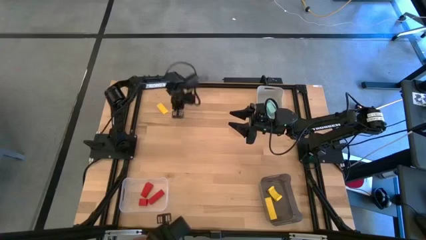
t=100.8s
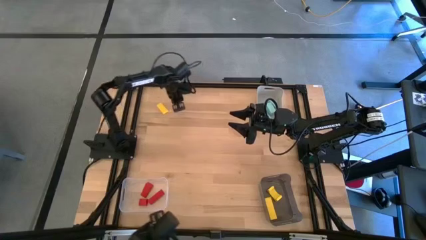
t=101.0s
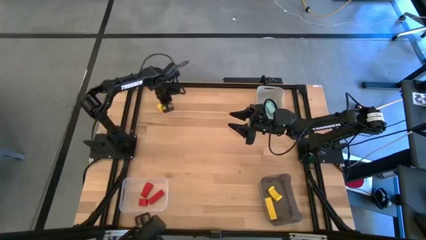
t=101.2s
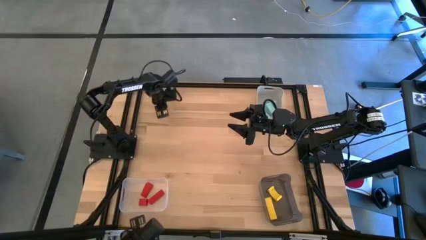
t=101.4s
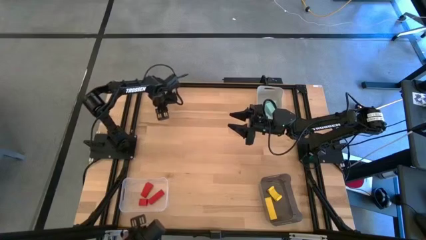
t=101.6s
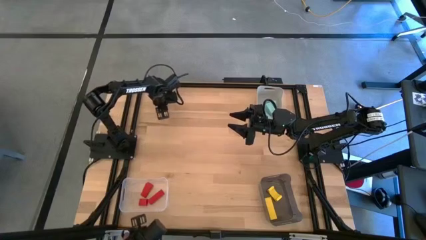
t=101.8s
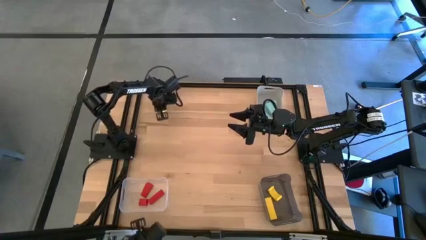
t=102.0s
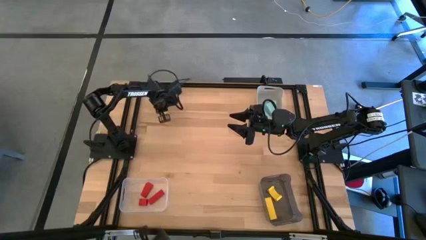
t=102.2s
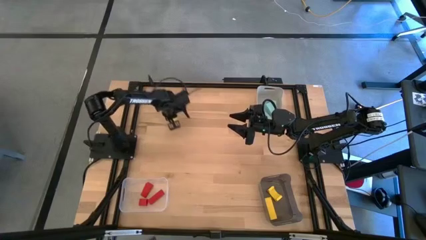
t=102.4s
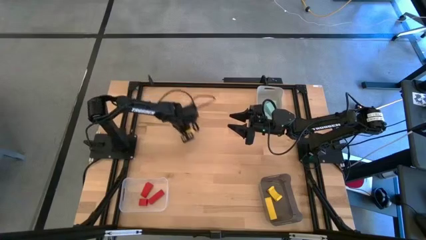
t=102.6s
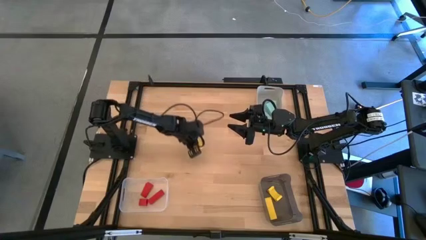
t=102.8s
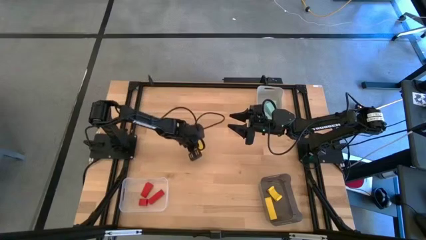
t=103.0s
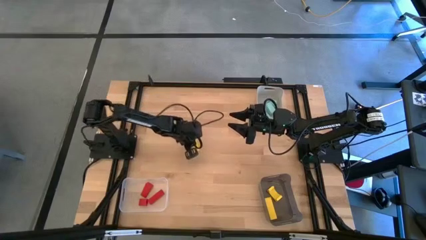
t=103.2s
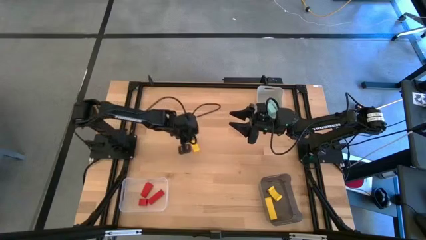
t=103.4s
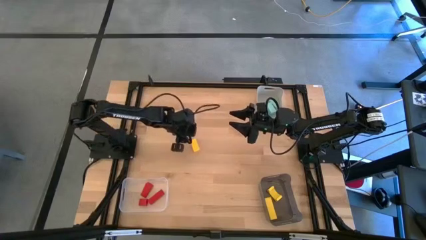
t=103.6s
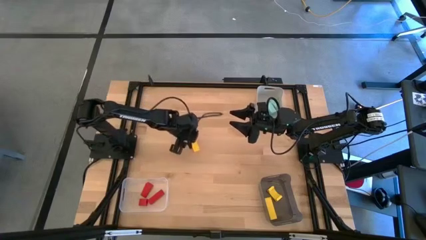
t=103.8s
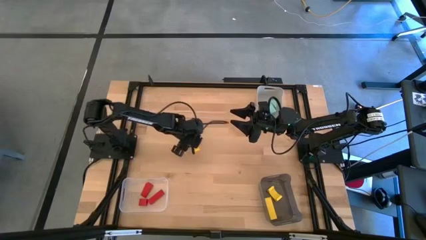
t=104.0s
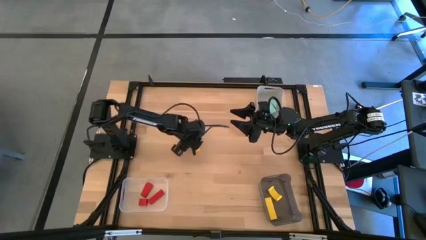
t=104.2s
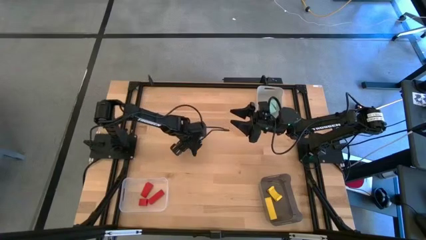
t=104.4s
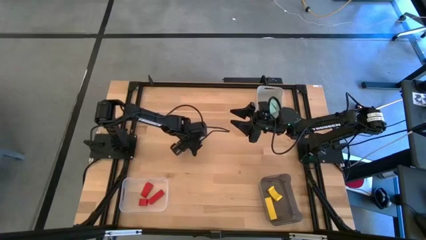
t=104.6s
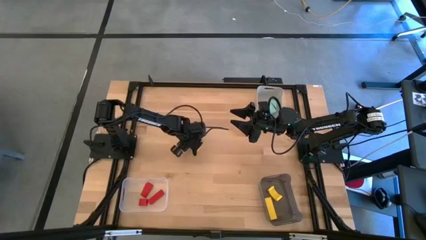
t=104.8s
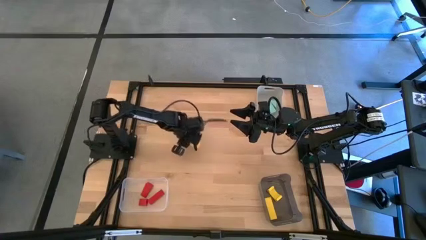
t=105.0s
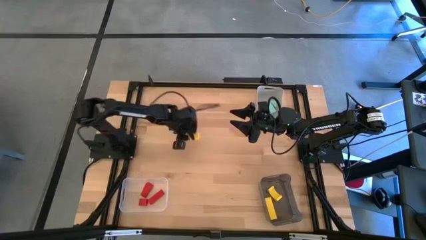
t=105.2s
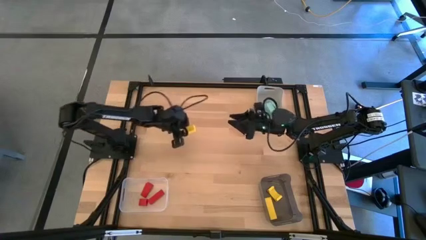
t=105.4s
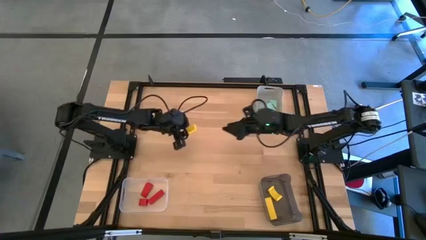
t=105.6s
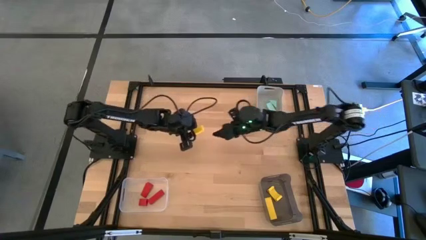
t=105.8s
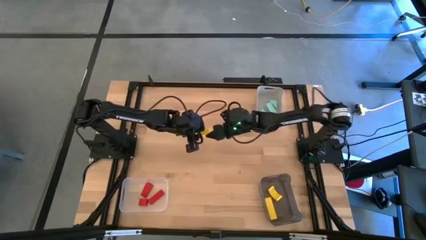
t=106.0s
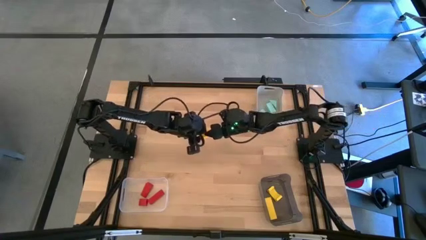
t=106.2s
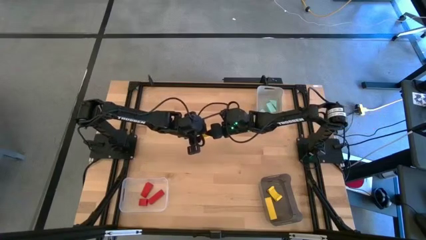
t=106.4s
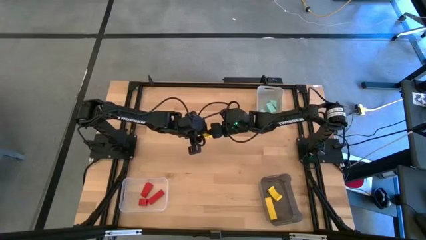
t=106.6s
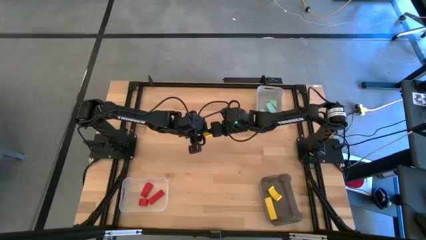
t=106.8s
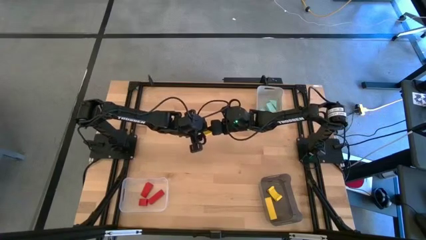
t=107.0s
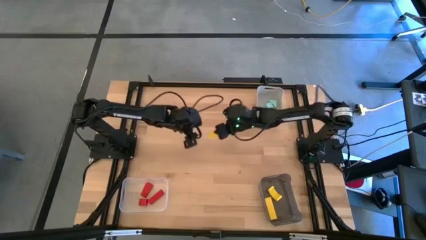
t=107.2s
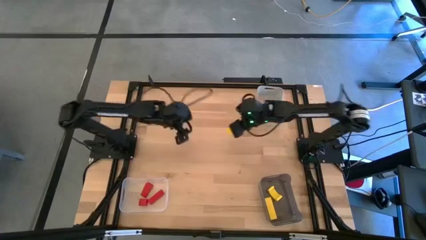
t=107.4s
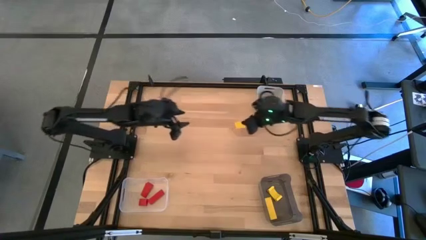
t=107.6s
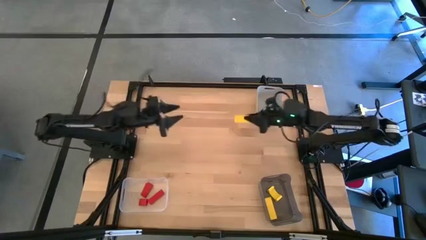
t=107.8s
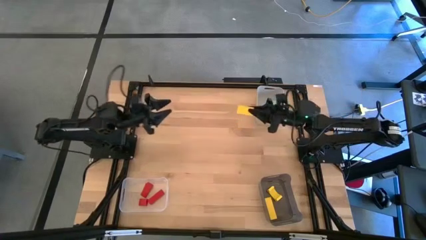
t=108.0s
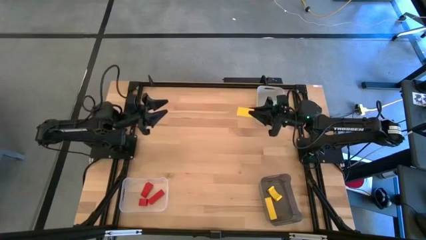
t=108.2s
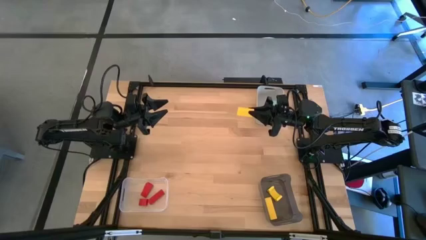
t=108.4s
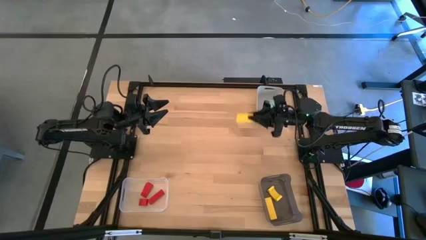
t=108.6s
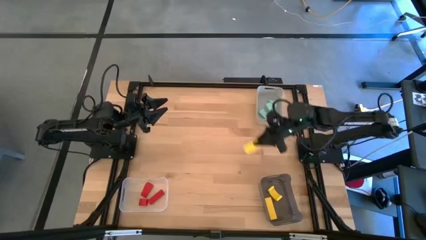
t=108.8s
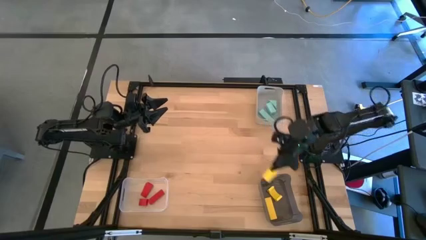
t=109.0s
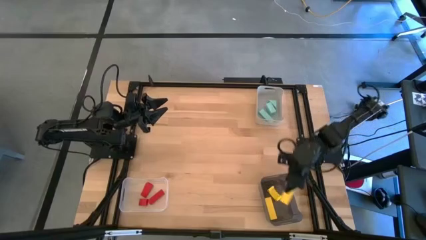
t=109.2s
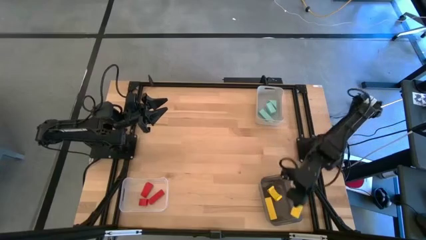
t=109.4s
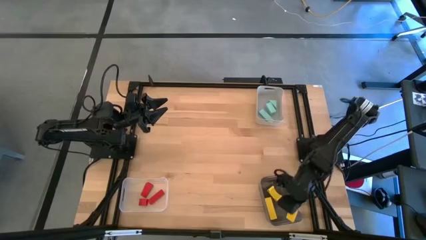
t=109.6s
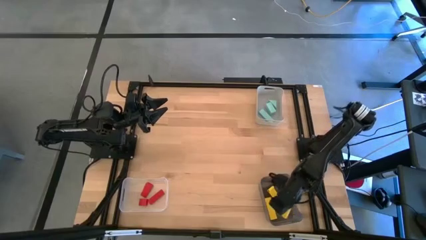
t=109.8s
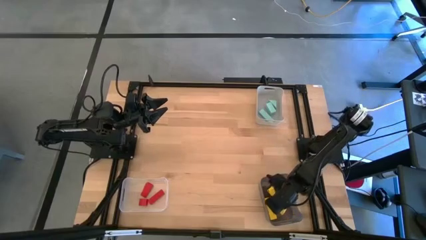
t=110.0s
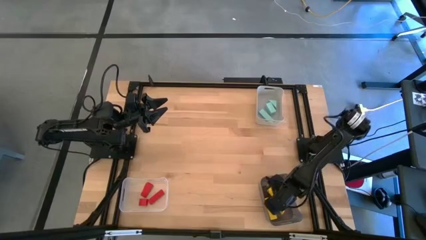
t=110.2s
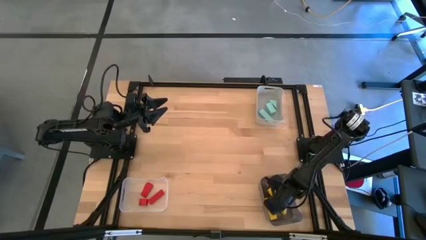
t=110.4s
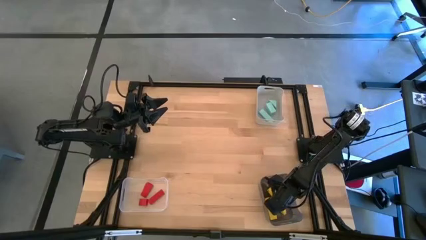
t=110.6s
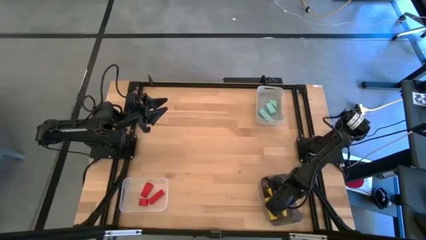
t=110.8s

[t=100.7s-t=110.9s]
Task: Sort & place blocks by color
Put the yellow block into the black bin

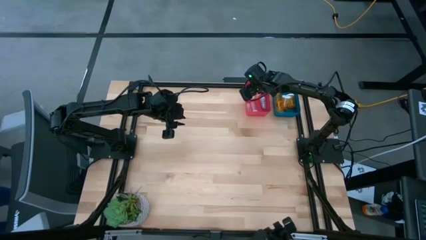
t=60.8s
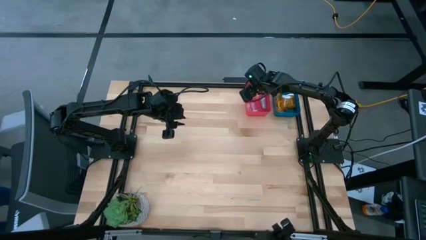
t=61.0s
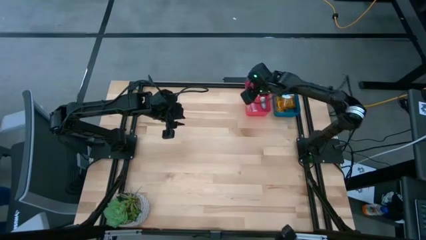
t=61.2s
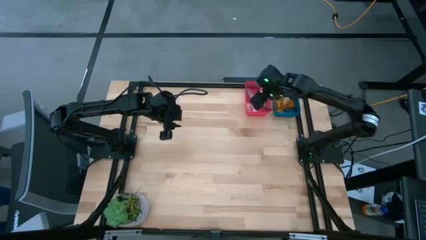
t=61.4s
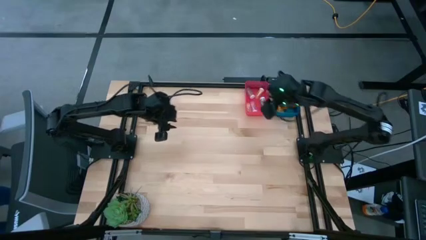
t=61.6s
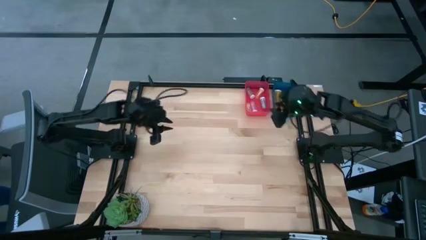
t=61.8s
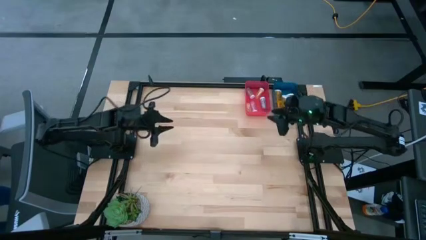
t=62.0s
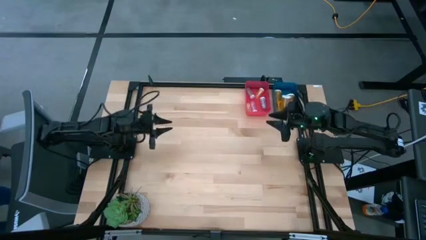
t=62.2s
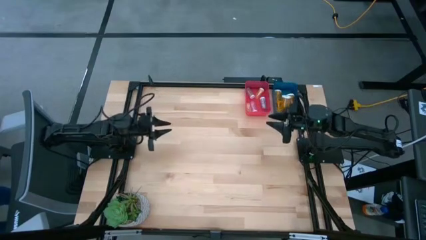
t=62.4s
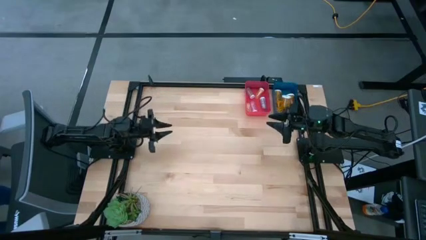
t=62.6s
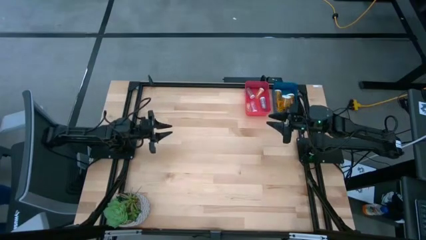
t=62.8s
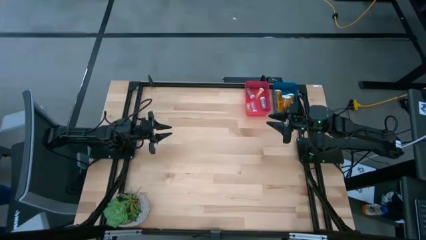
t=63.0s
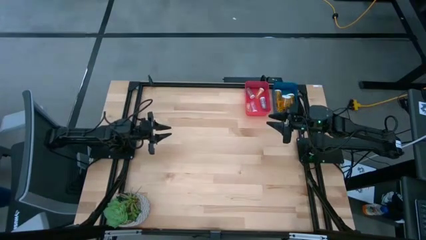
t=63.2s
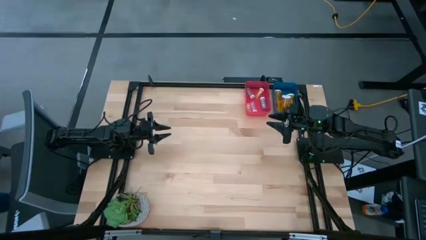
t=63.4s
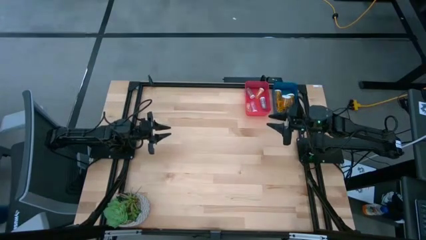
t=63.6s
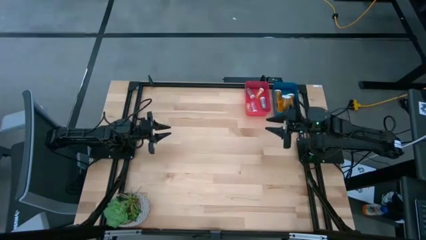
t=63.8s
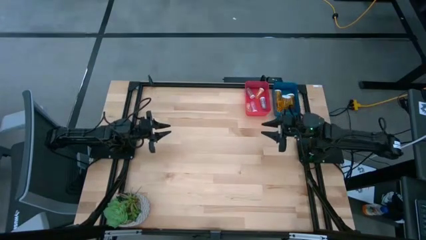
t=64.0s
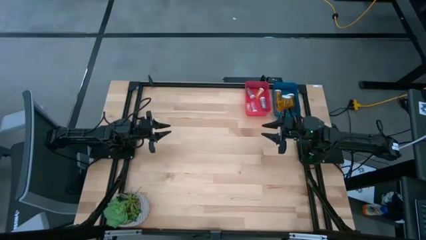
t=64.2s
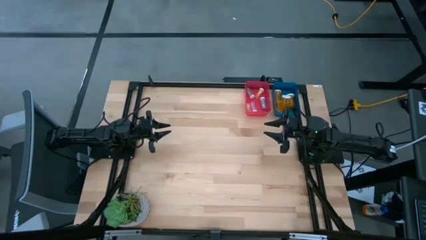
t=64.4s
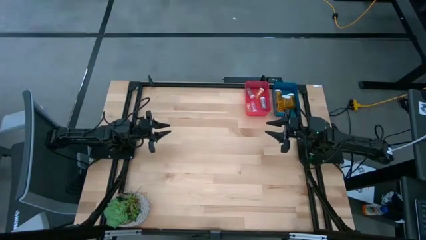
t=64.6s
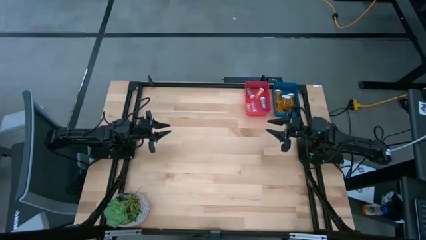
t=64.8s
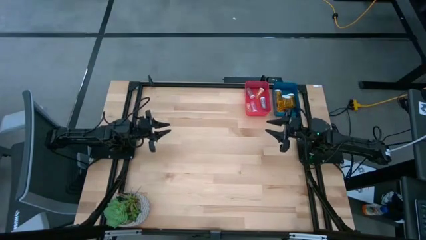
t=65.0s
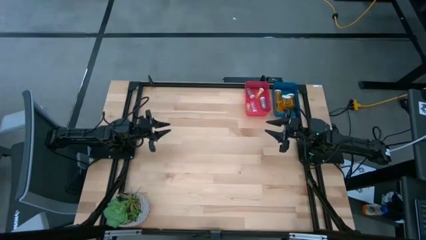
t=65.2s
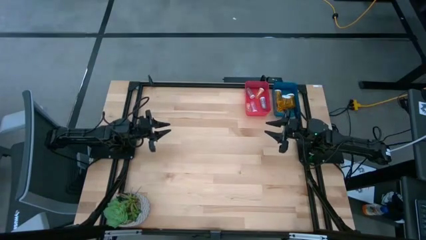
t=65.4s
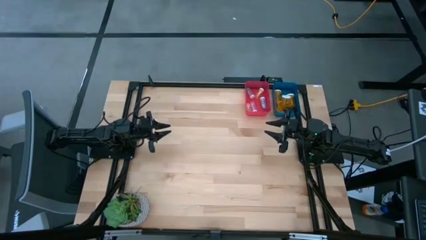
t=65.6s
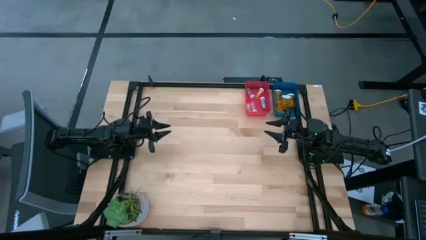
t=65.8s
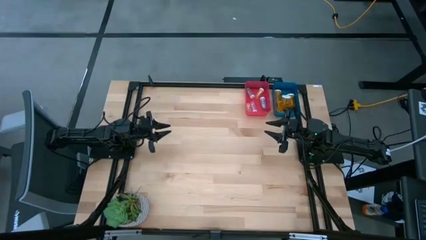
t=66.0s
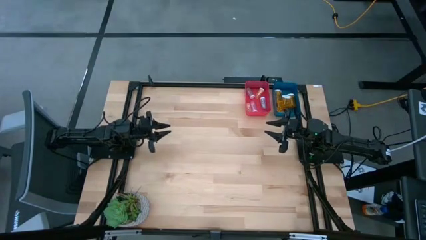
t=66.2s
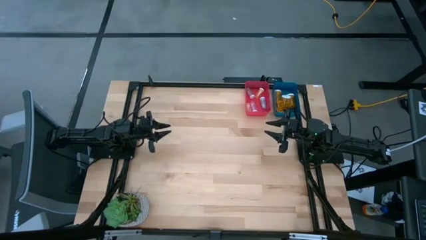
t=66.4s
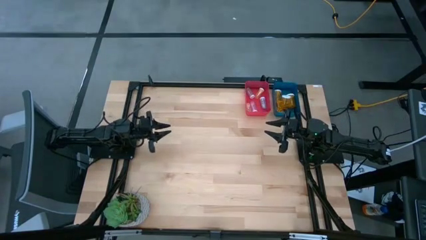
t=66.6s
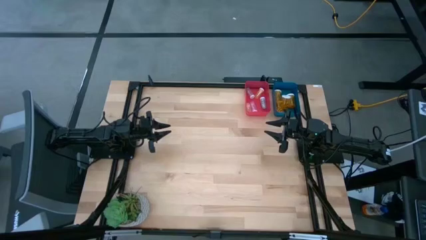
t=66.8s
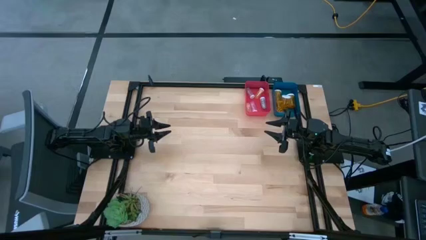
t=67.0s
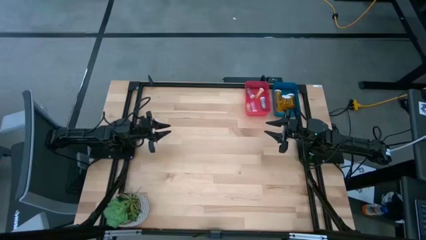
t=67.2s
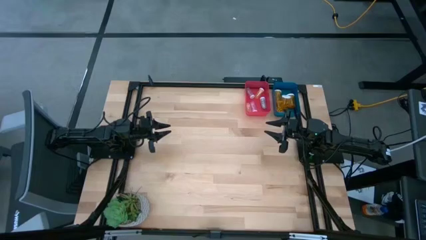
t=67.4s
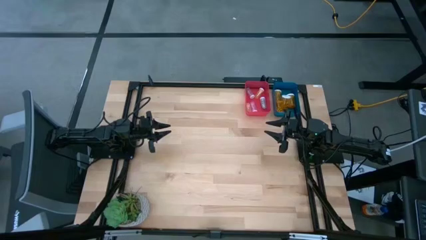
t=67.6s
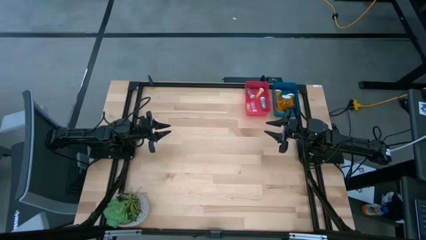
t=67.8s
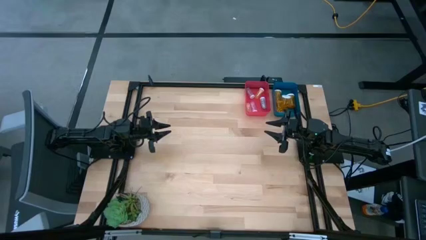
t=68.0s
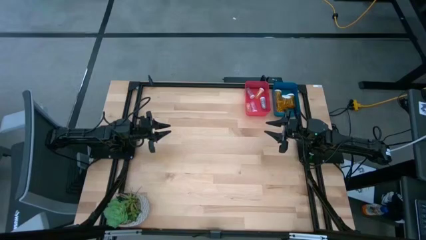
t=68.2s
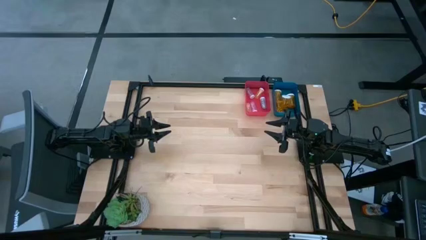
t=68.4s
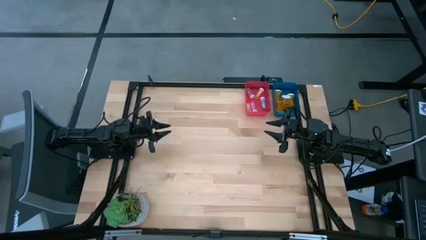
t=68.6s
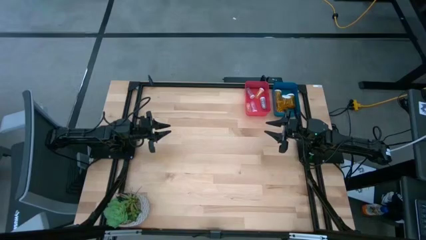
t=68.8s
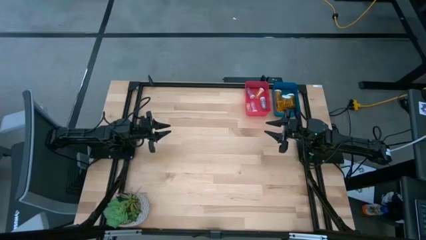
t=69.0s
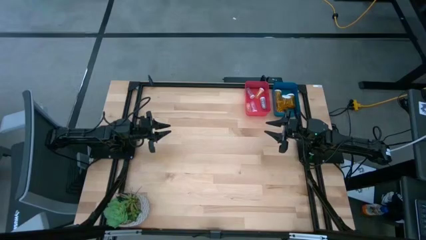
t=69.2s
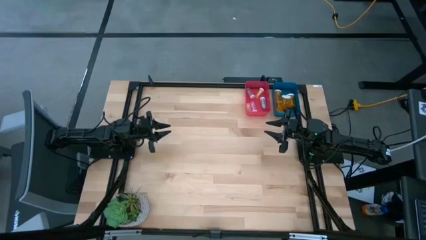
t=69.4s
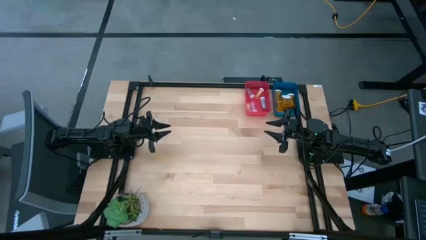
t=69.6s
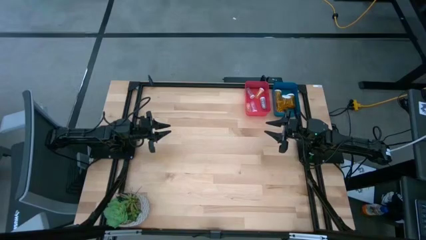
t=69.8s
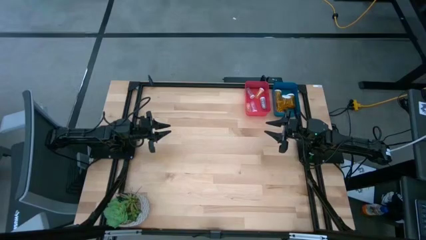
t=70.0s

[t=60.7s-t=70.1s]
Task: Pick and place medicine bottles into bin by pill shape (circle, oval)
Return to Home Position
